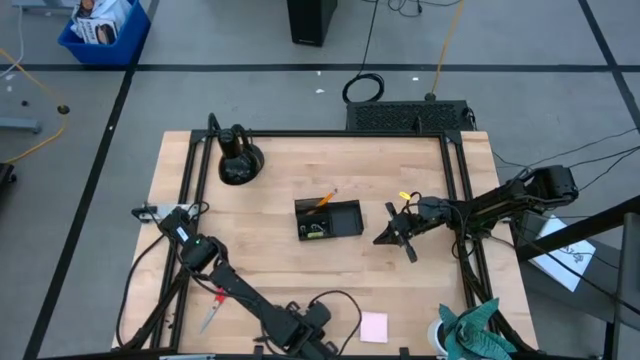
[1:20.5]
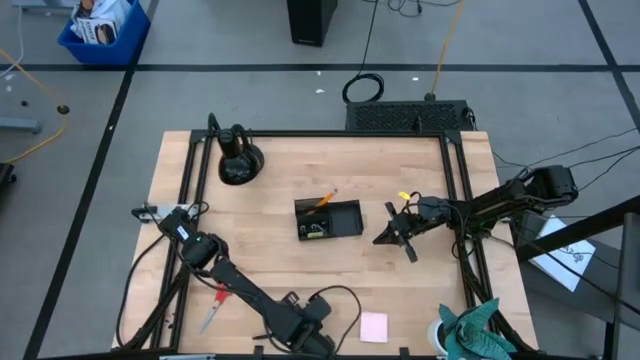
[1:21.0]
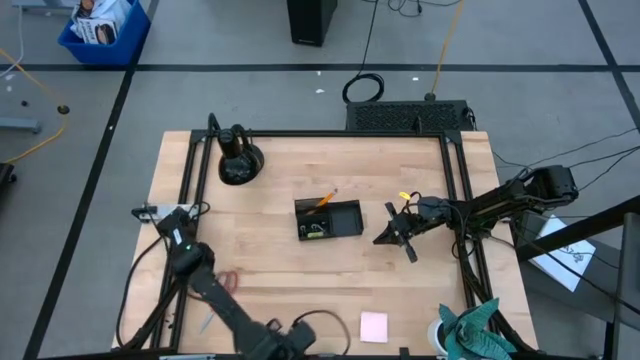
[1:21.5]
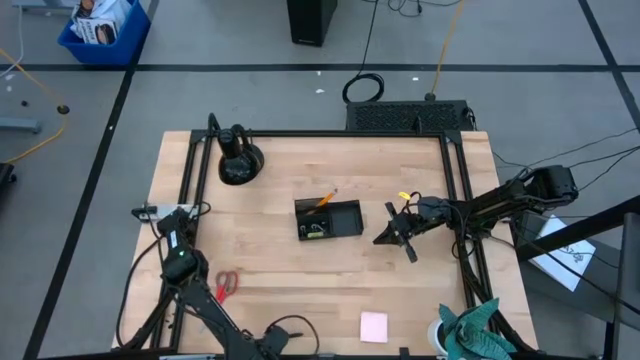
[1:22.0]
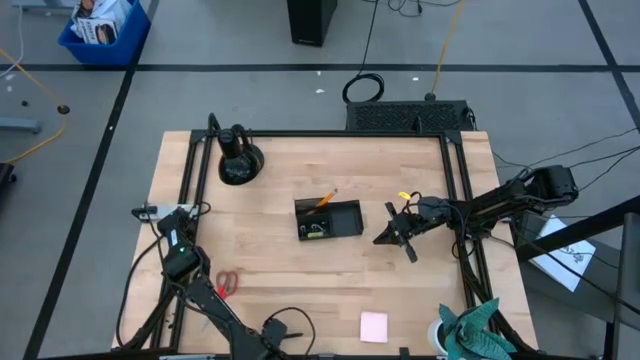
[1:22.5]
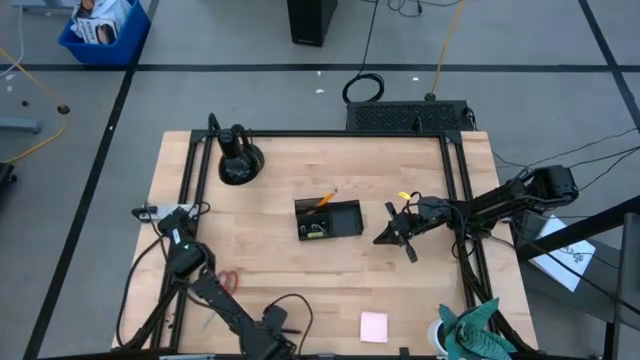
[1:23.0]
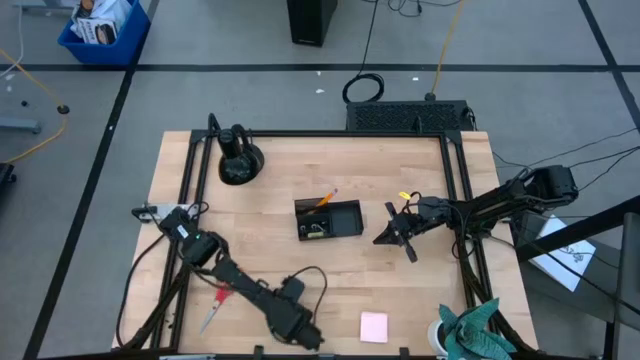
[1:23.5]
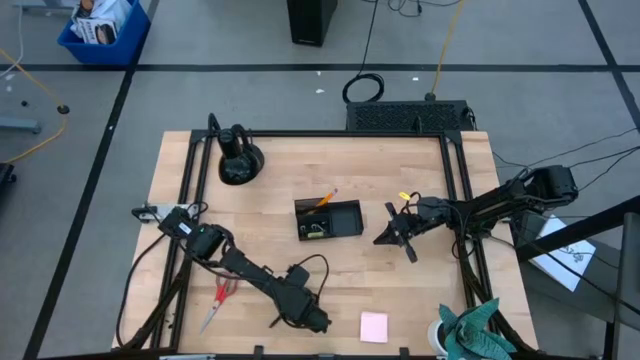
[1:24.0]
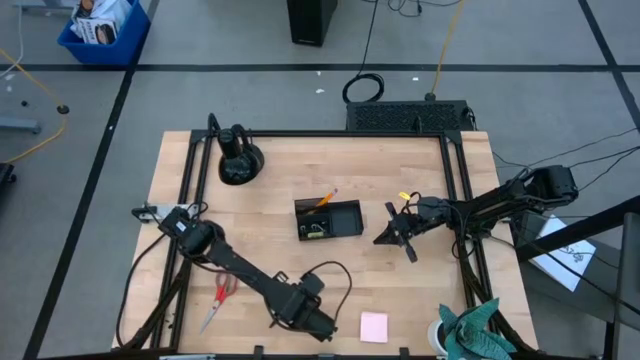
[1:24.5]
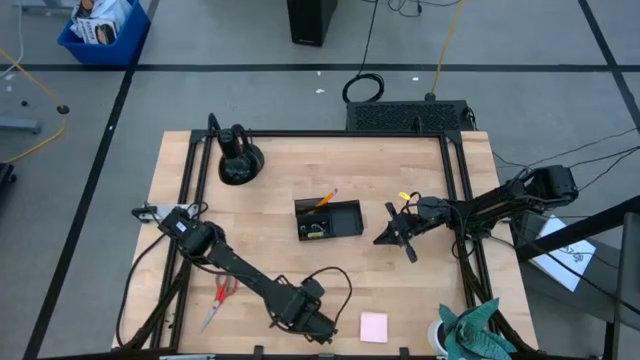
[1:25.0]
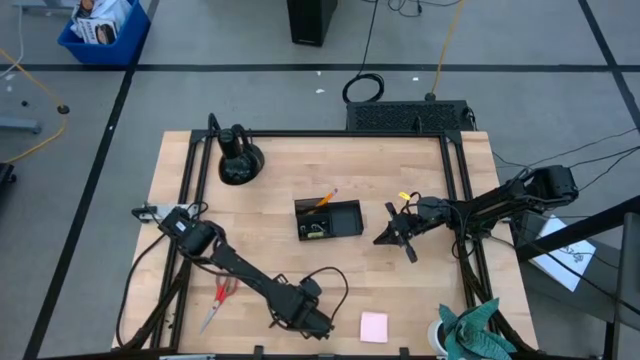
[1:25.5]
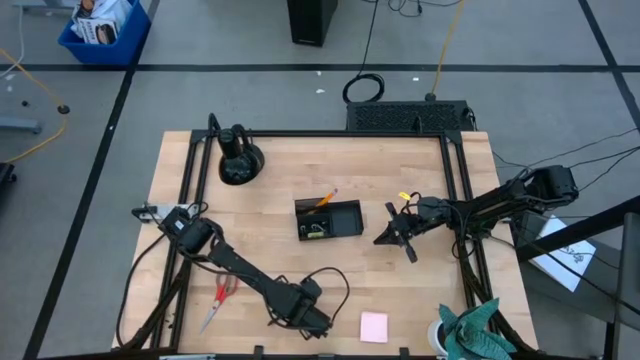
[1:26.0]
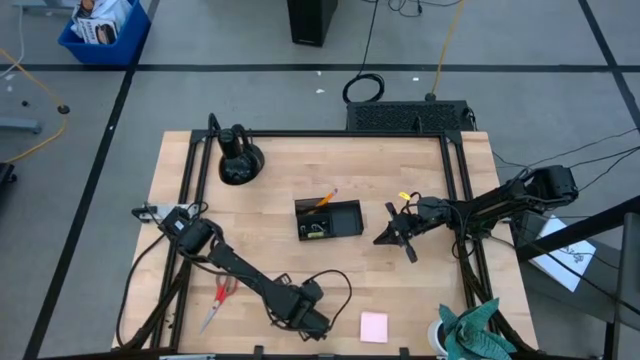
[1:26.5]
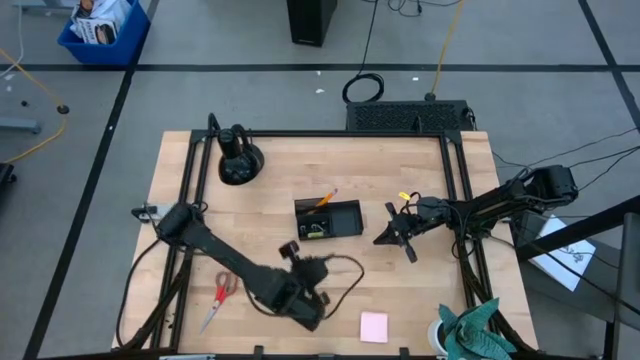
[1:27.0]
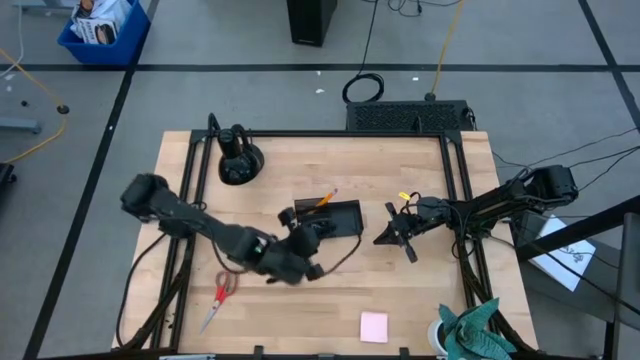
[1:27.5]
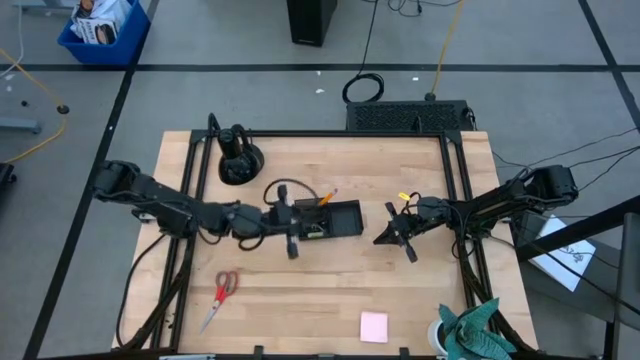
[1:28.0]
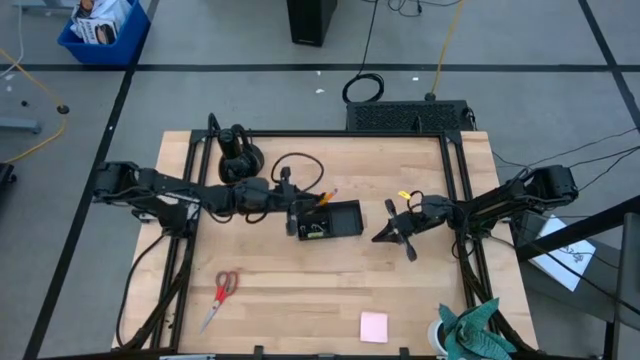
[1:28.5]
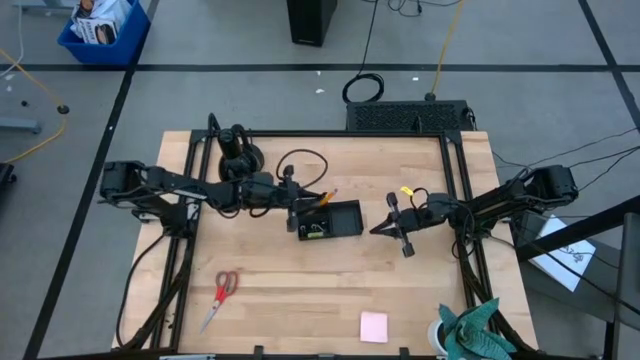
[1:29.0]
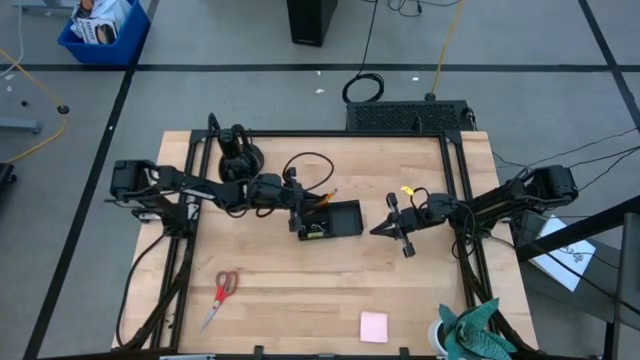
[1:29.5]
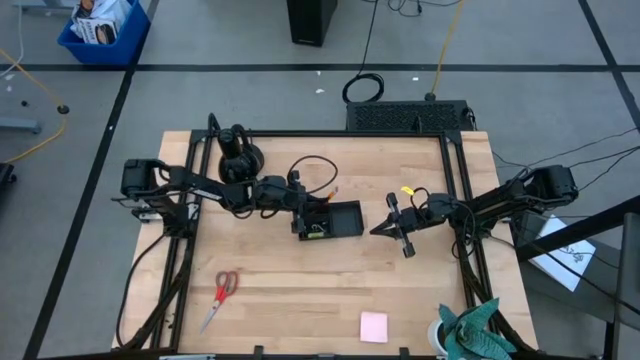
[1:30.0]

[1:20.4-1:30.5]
Task: Pick and place office supplies into organizer
Put the black pen into the black desk organizer

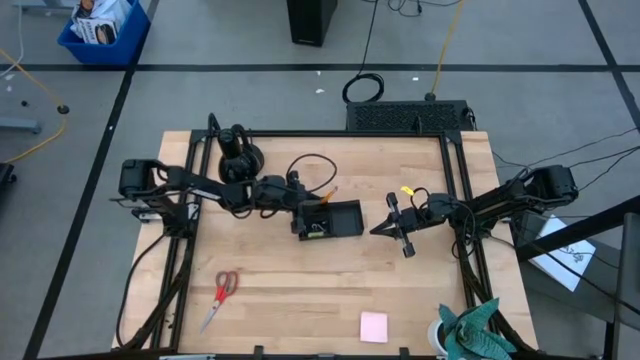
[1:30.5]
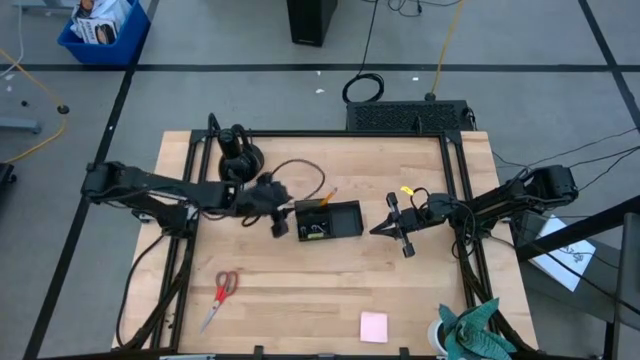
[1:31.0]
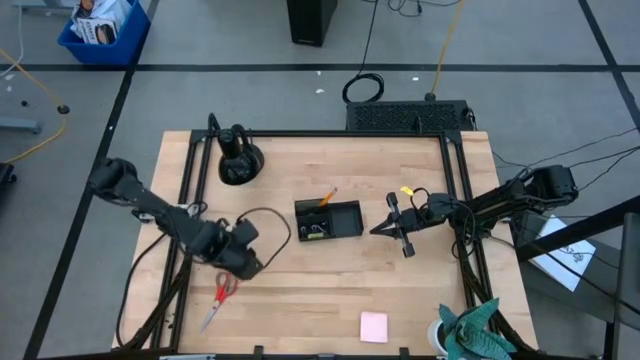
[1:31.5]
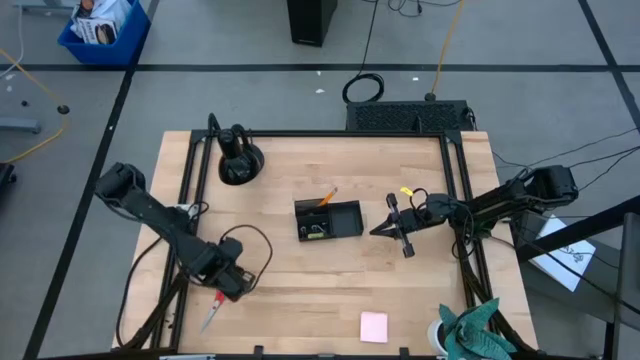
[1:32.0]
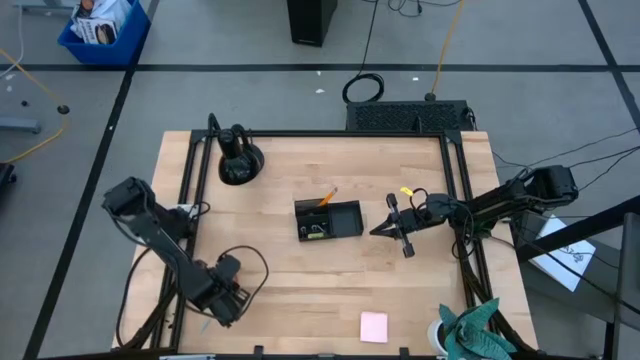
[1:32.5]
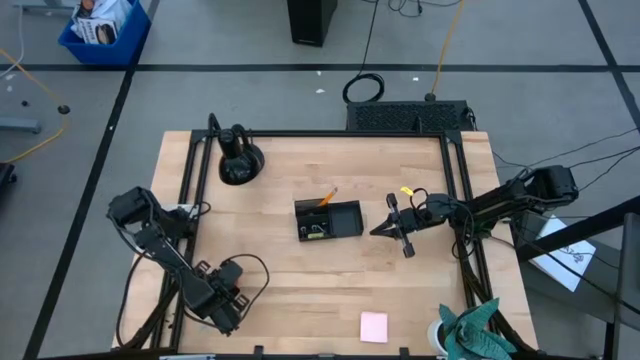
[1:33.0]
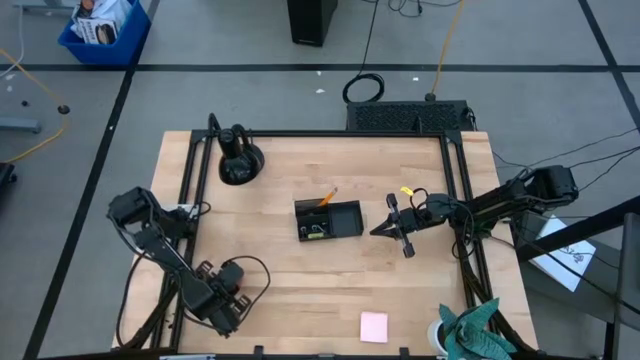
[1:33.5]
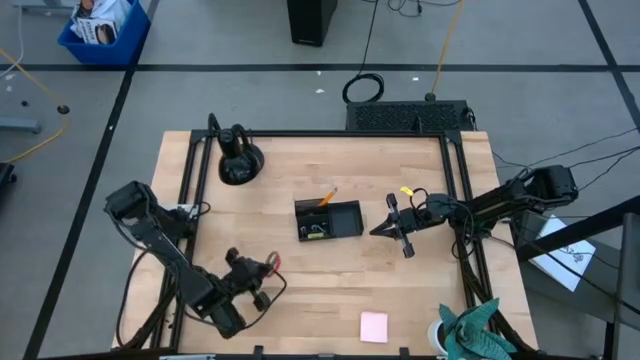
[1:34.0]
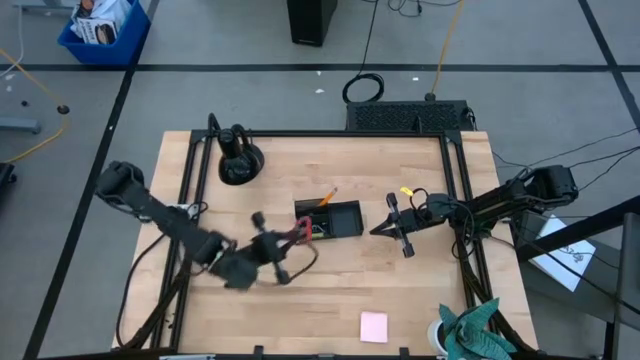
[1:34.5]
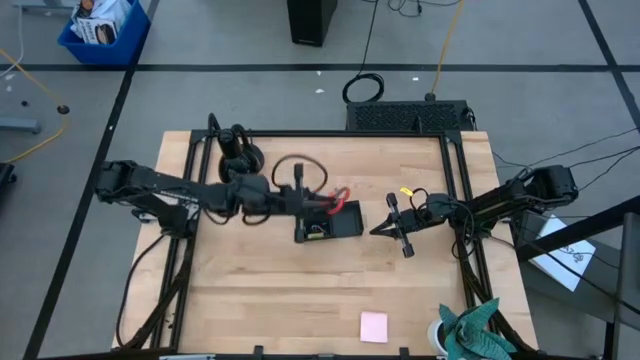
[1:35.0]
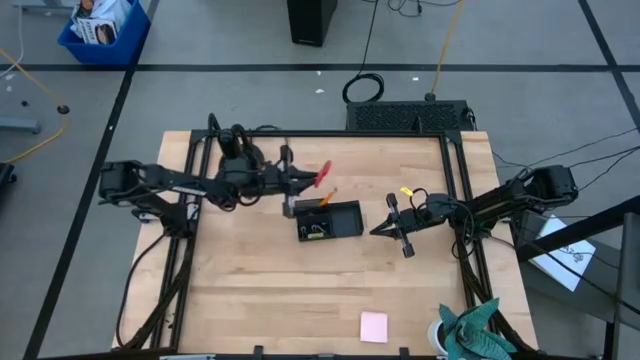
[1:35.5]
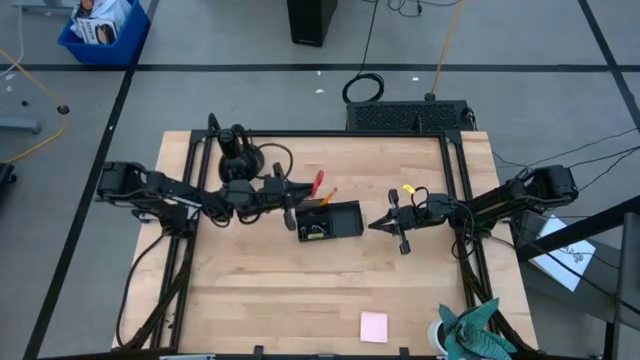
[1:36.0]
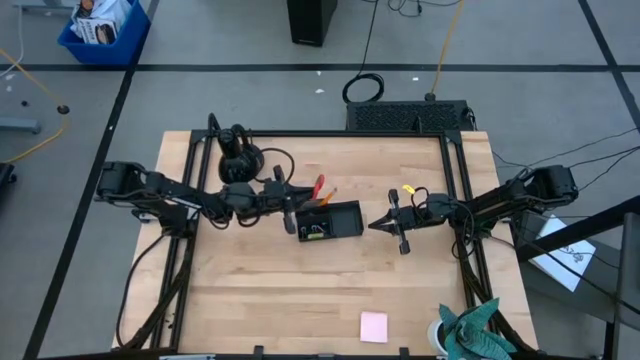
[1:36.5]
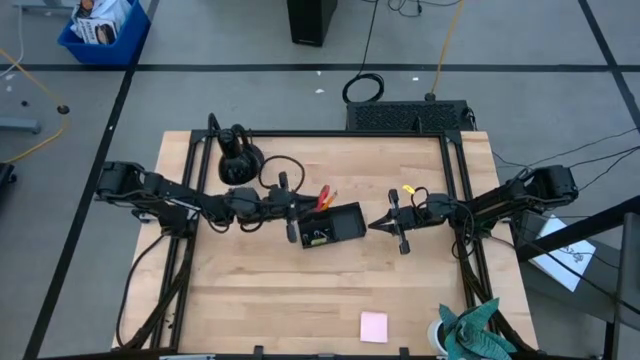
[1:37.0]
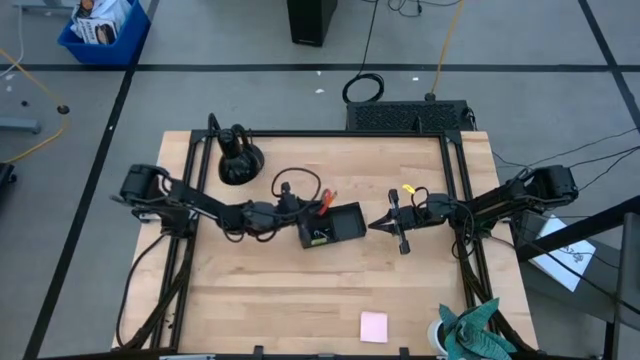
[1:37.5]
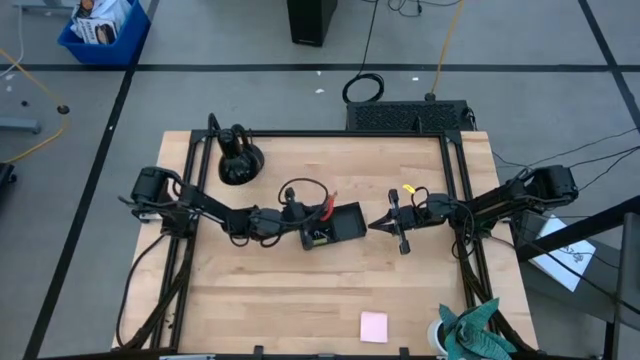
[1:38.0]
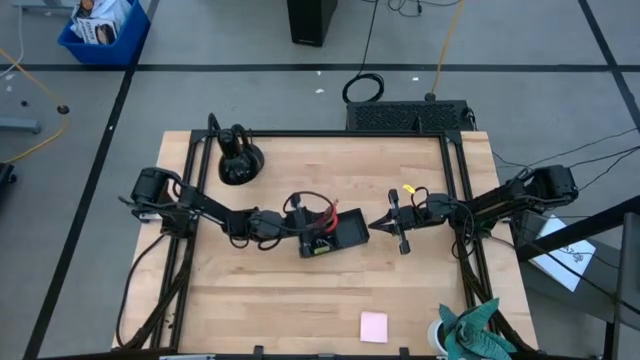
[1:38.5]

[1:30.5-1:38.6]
Put the orange scissors into the black desk organizer

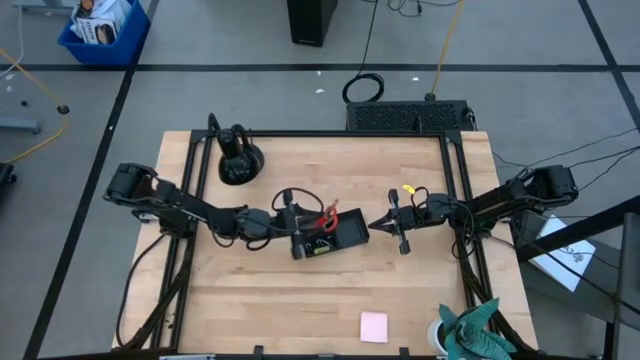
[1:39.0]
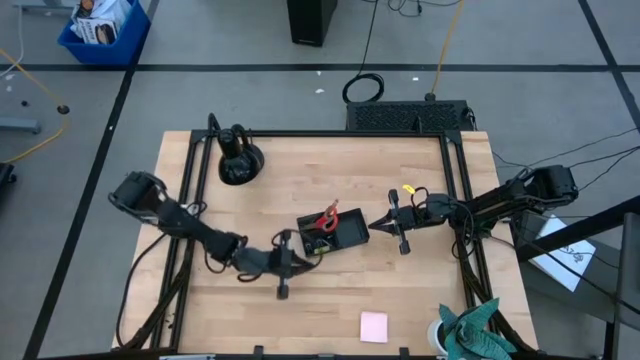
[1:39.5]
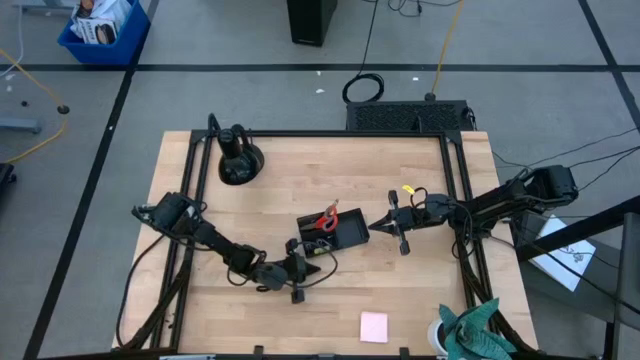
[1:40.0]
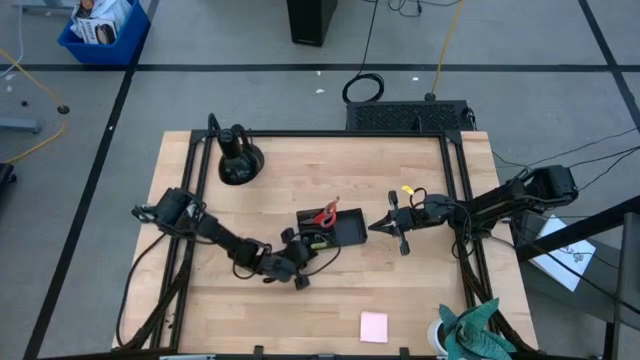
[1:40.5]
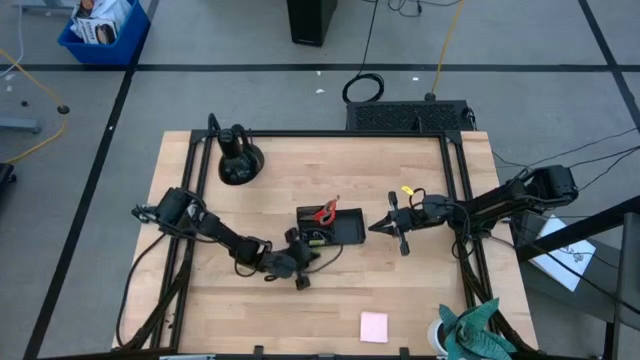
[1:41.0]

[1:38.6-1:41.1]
Adjust the black desk organizer
